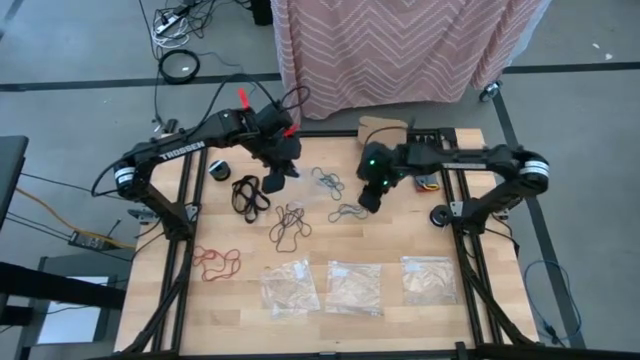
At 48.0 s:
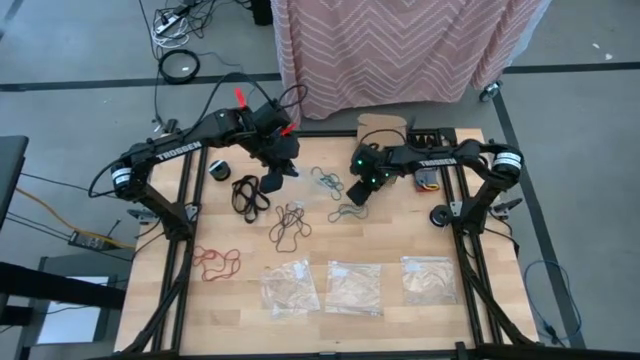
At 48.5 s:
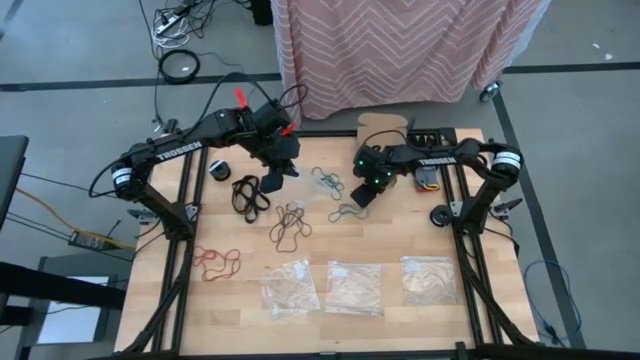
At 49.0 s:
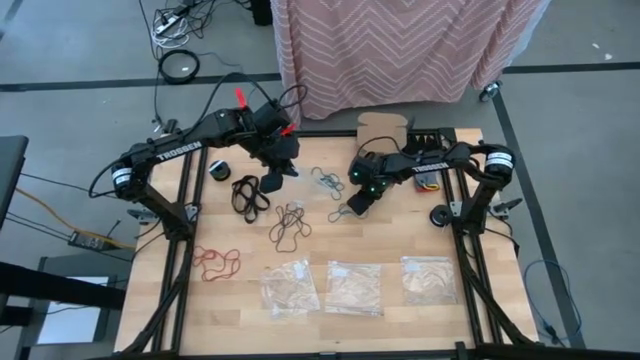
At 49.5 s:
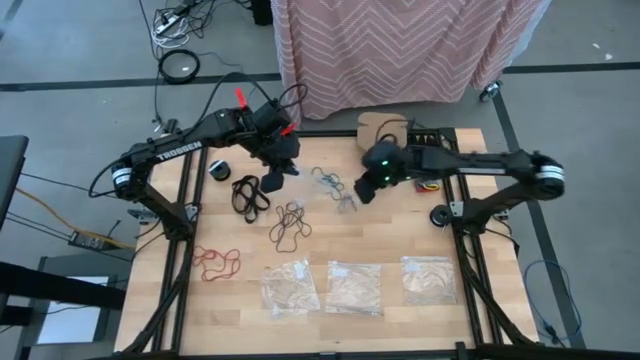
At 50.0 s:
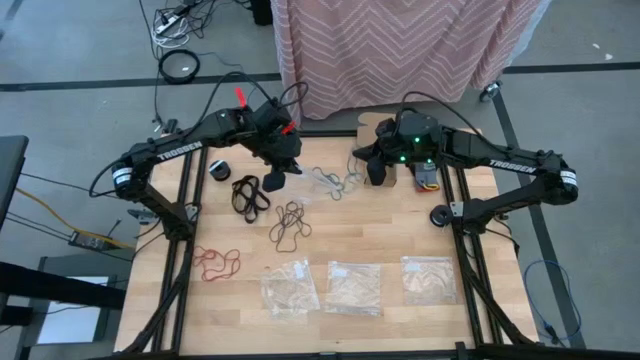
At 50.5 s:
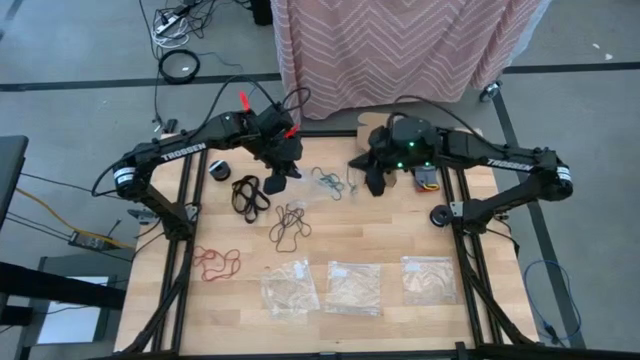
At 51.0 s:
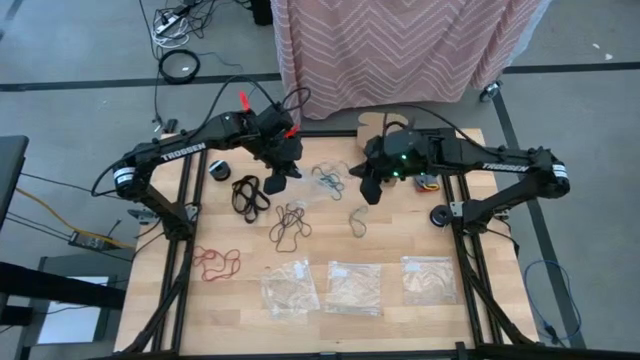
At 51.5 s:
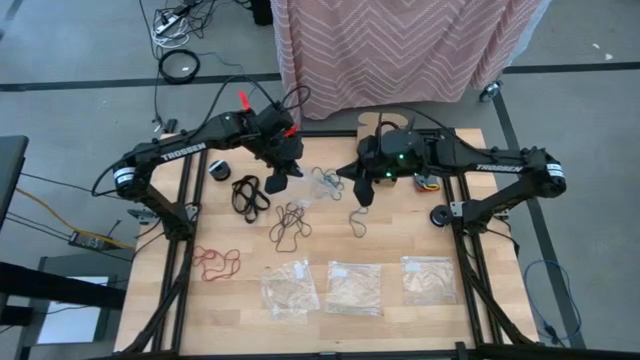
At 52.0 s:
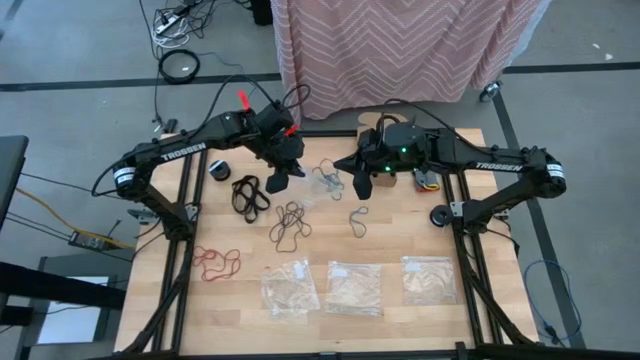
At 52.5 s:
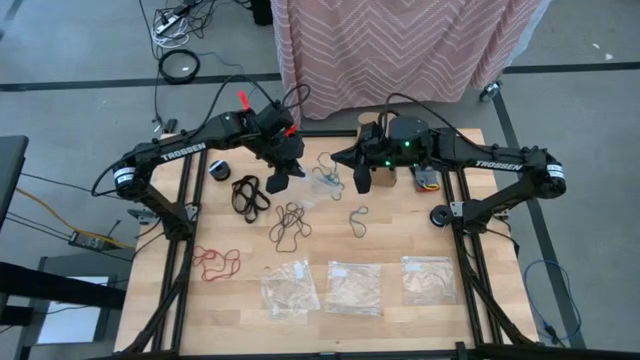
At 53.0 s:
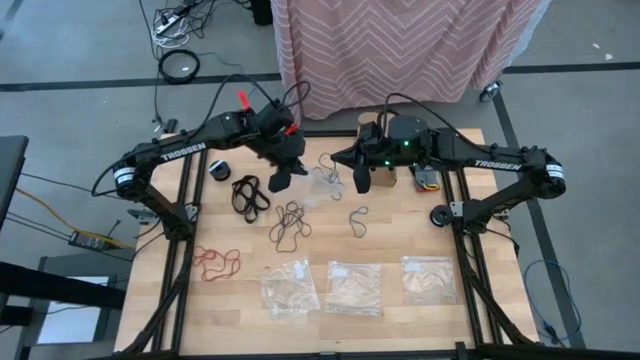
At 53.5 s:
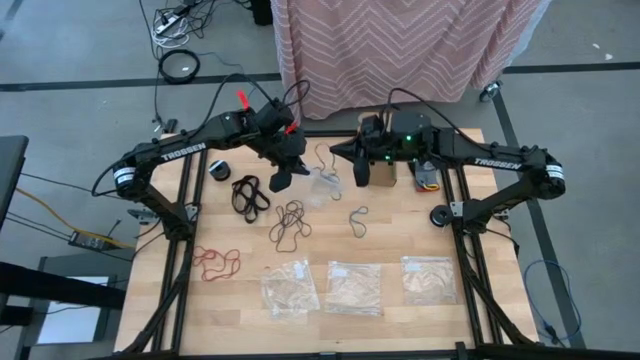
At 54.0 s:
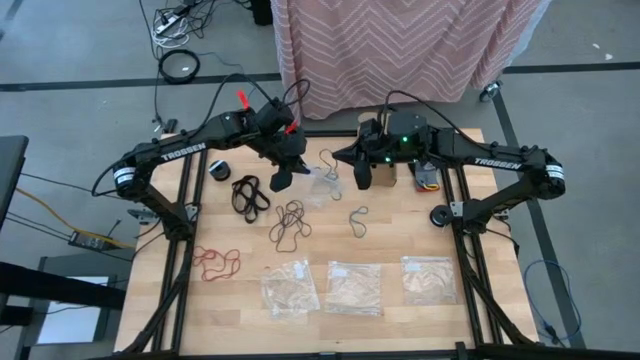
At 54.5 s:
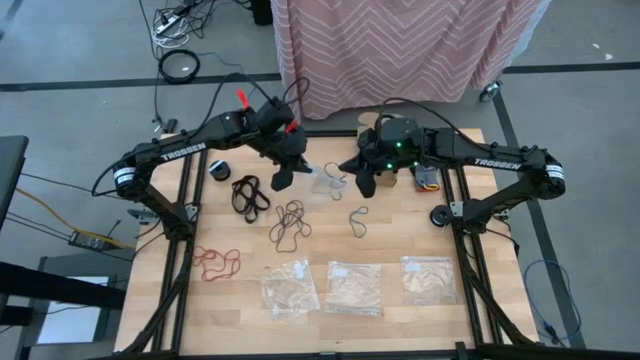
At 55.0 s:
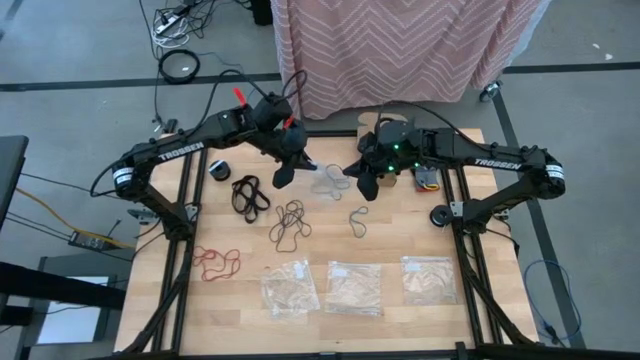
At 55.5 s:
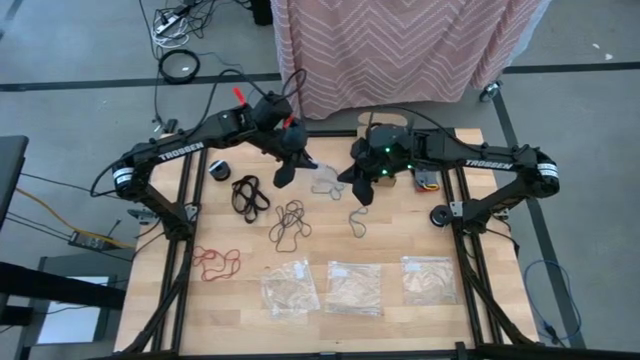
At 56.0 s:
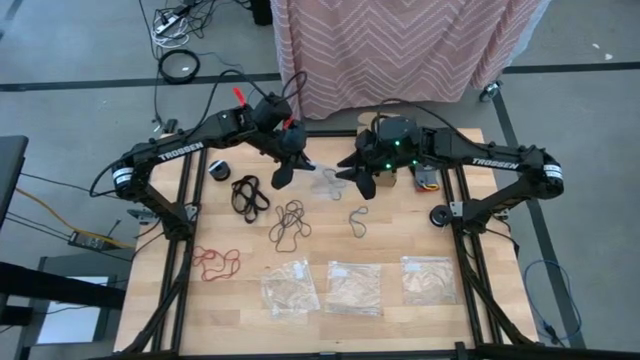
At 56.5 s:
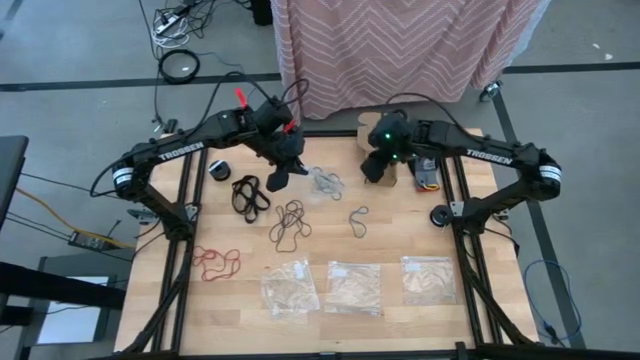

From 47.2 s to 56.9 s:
Task: Sort rubber bands
Put the blue rubber band into the top transparent zip bag

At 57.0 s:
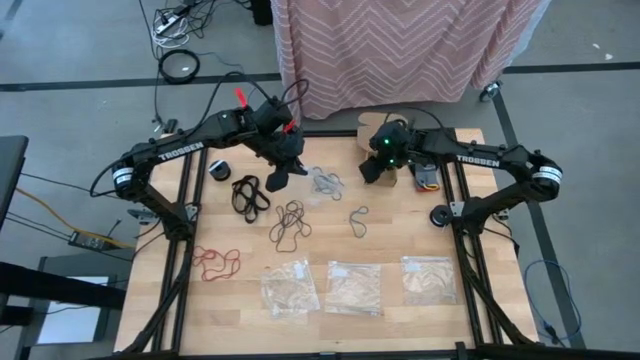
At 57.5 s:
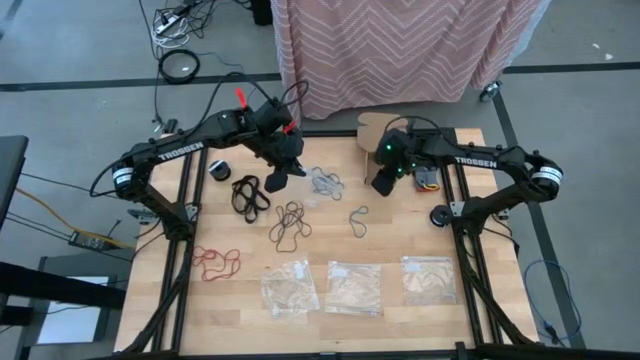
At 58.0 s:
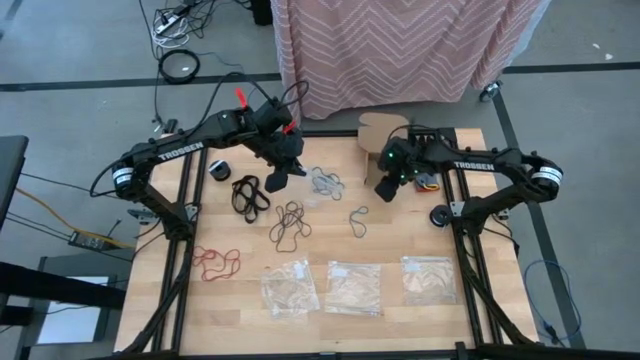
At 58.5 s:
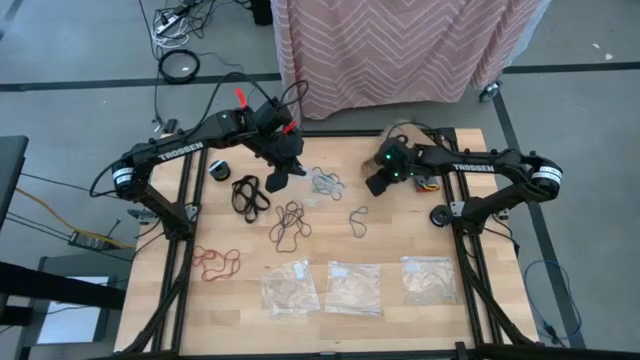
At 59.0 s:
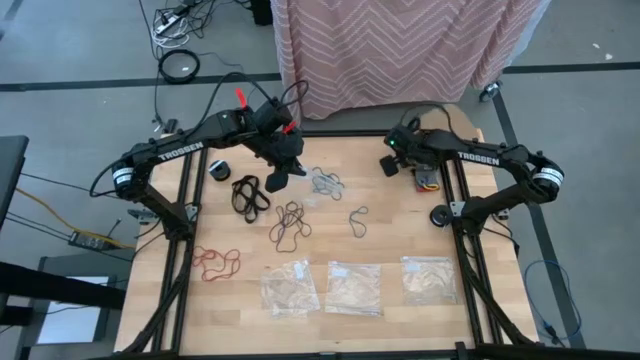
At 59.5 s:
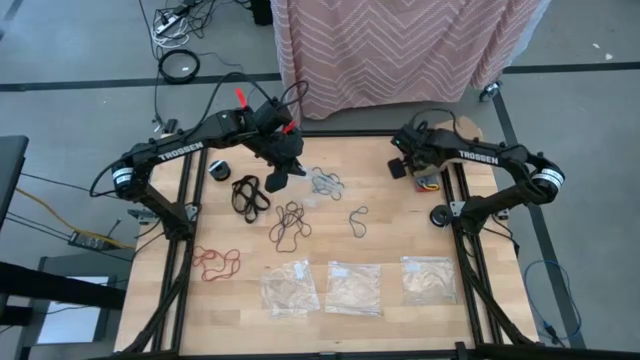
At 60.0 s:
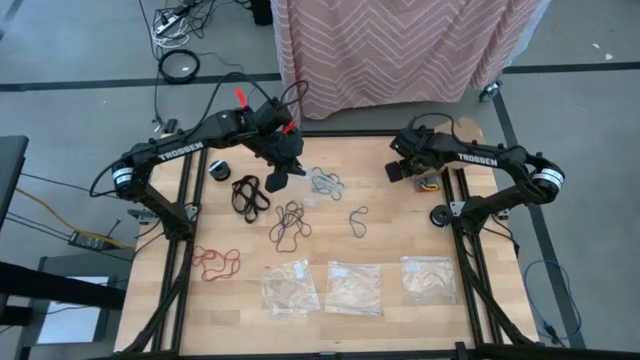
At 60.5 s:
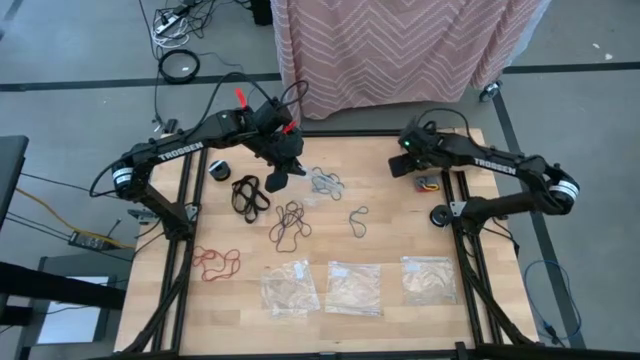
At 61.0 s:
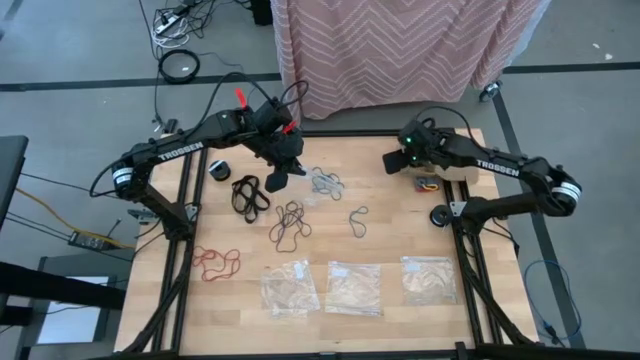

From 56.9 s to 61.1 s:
Adjust the box to the top right of the table

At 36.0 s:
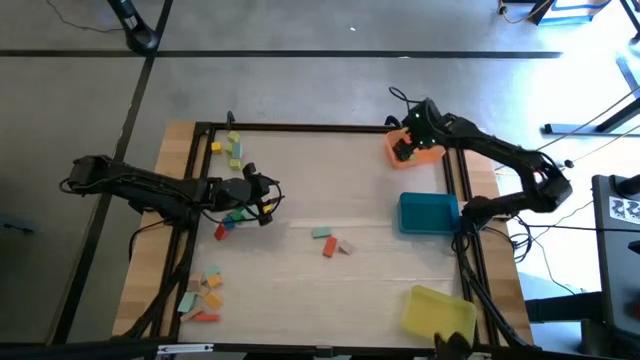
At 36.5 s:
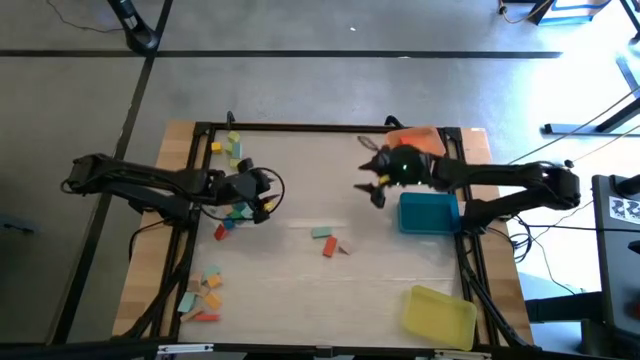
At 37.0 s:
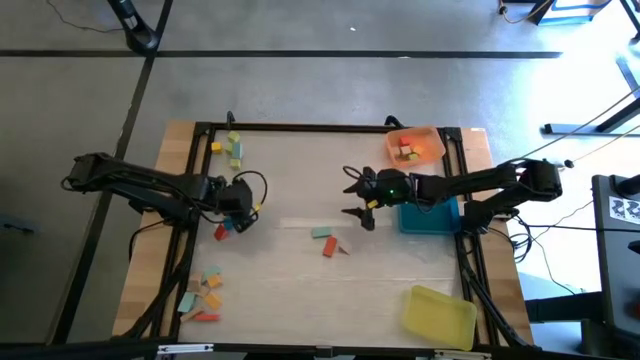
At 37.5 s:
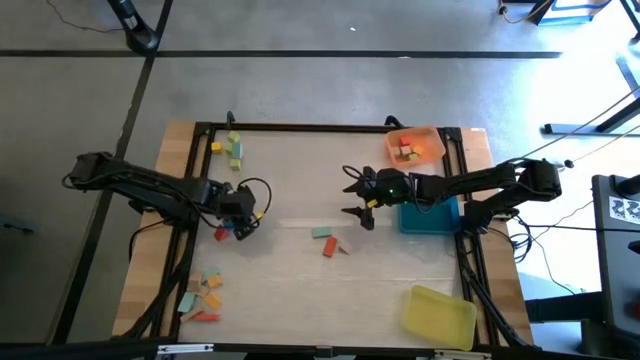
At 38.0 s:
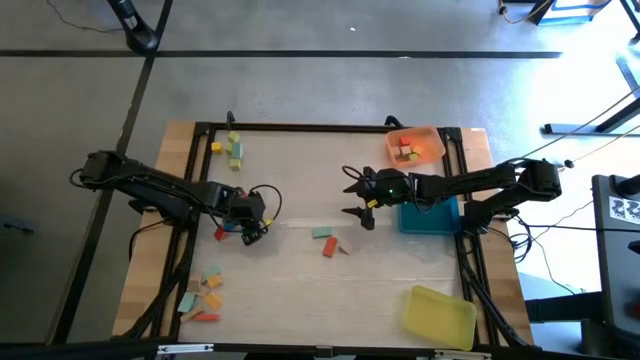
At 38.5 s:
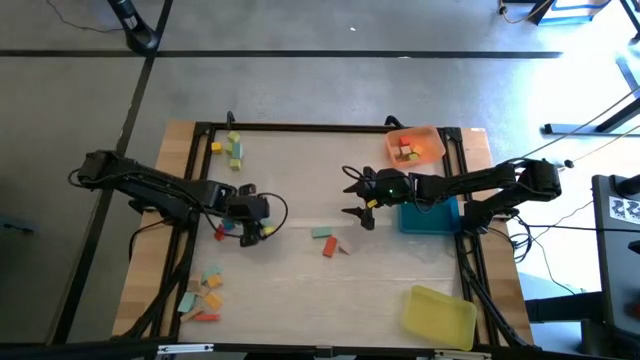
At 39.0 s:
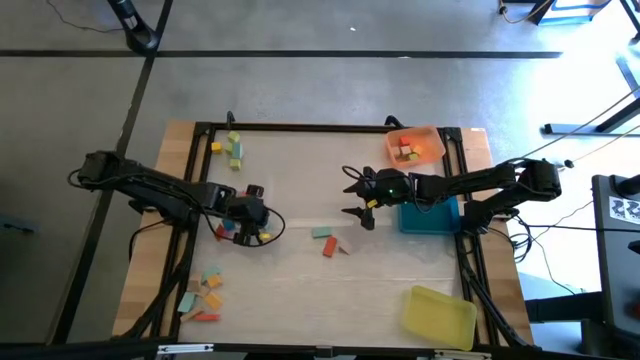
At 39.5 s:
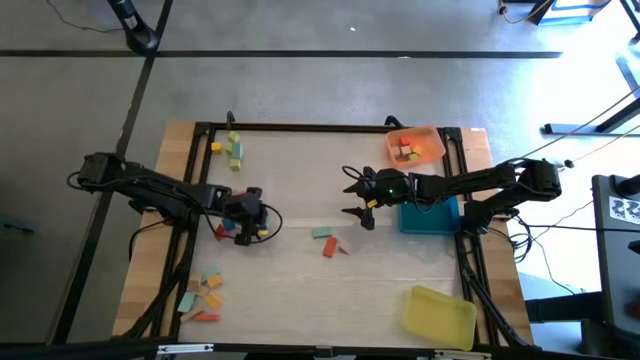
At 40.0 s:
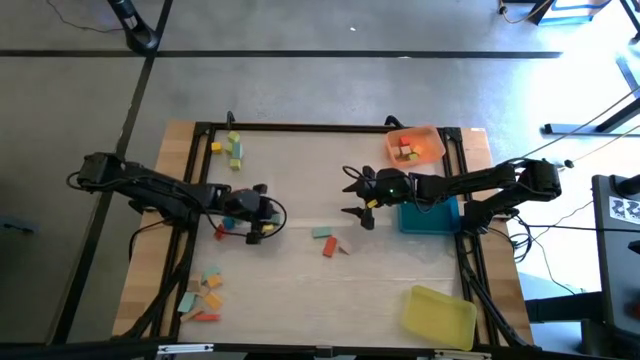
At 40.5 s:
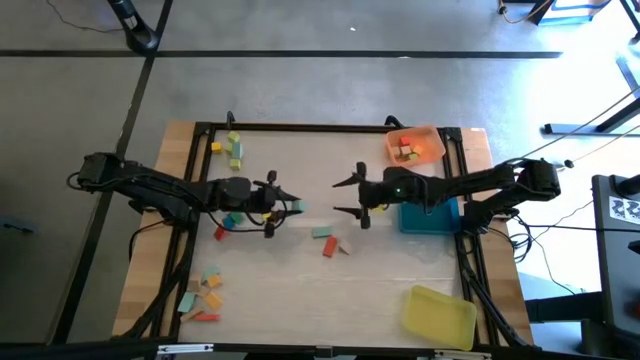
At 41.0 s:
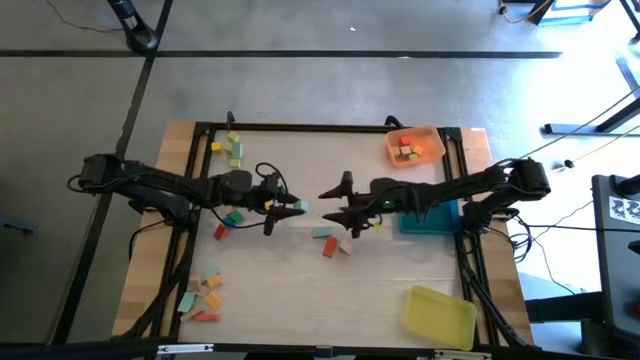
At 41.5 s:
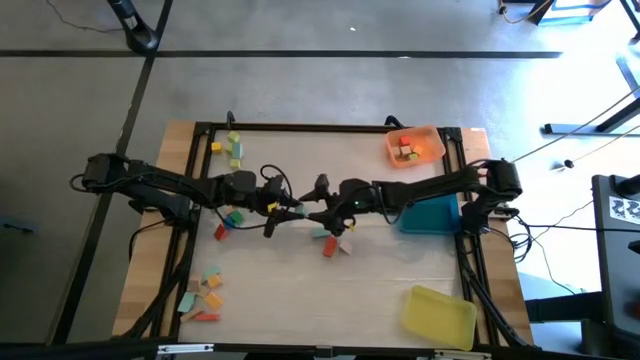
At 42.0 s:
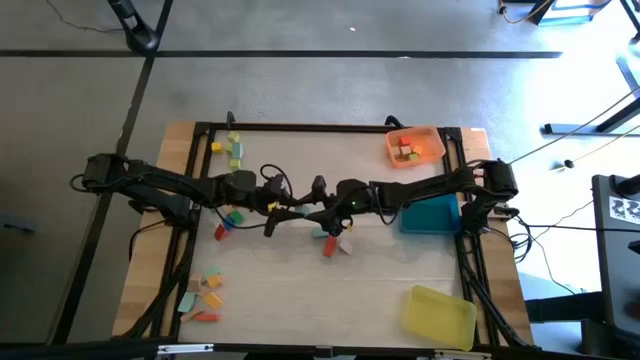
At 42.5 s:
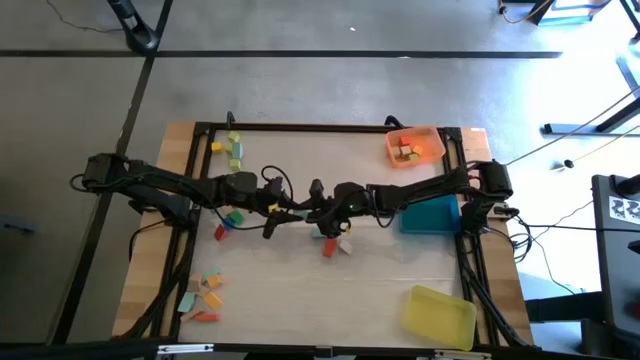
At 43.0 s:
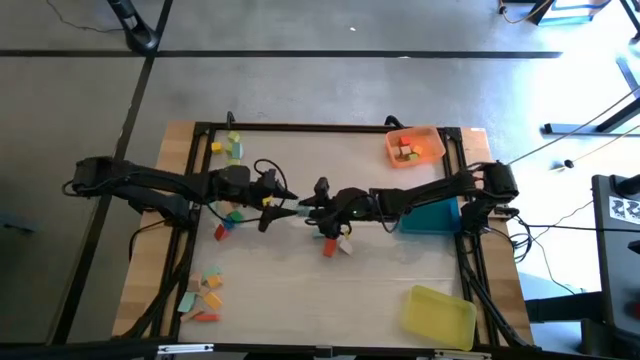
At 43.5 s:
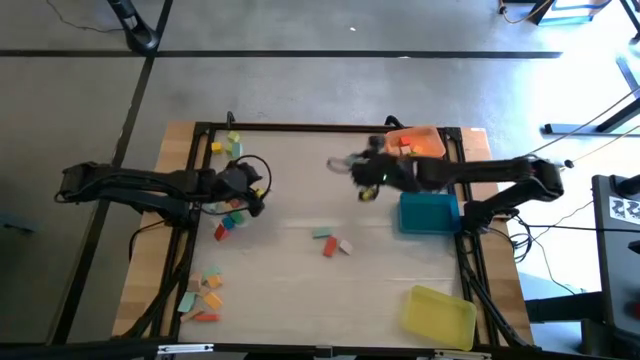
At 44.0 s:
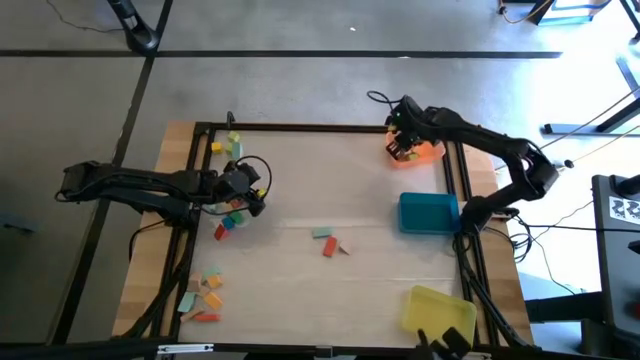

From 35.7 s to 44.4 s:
Task: Sort blocks by size
Put the light blue cube block into the orange bin
